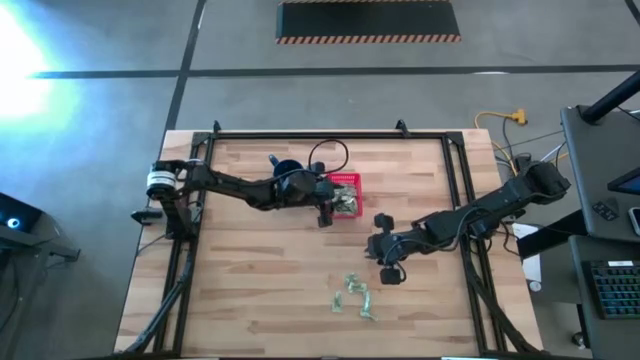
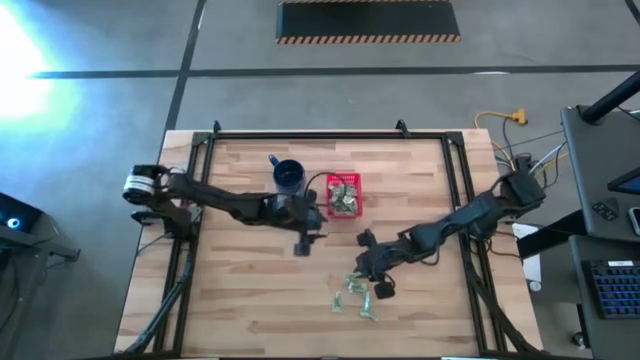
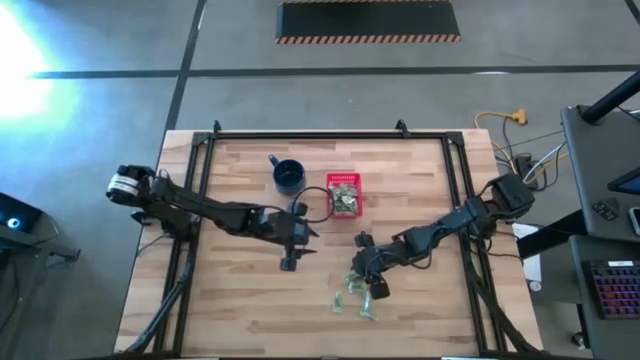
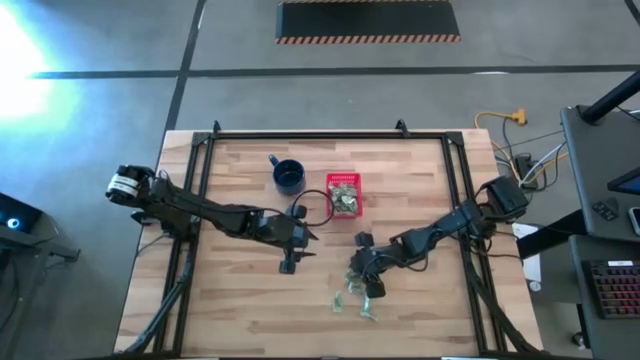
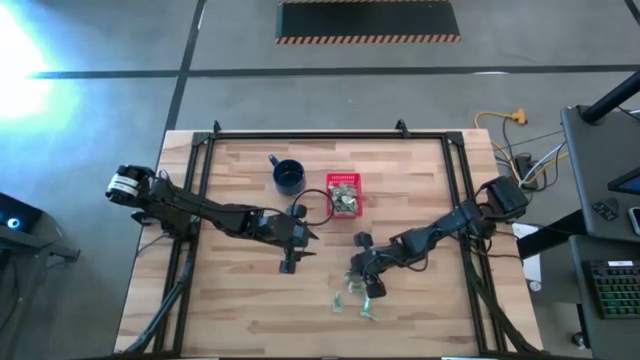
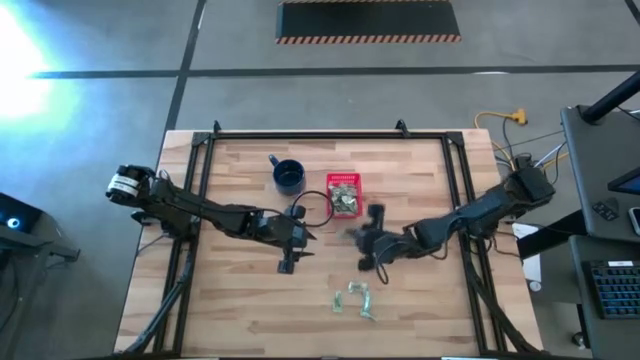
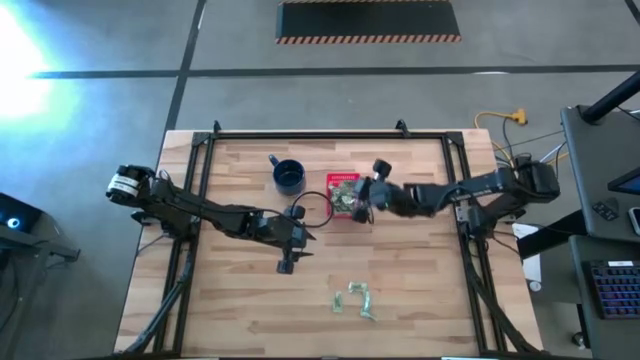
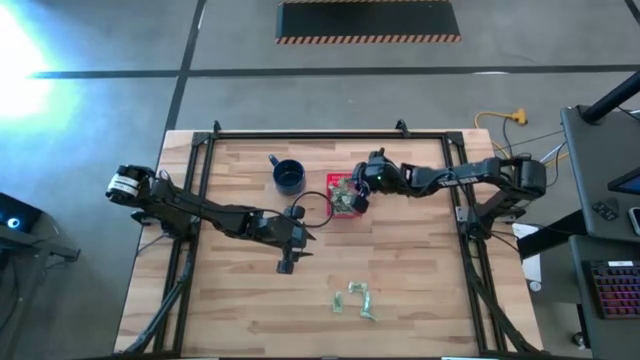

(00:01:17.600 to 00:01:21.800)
Task: Pick and place items into bin
Put the green stevia packet into the red bin

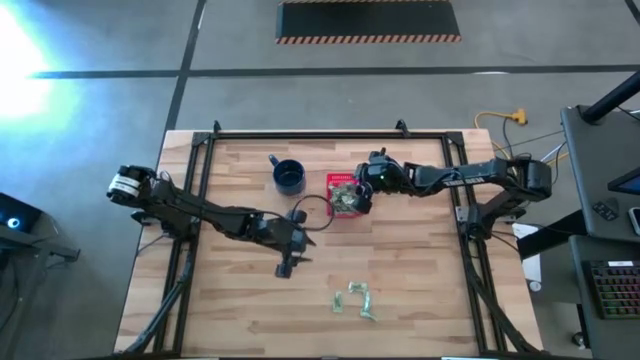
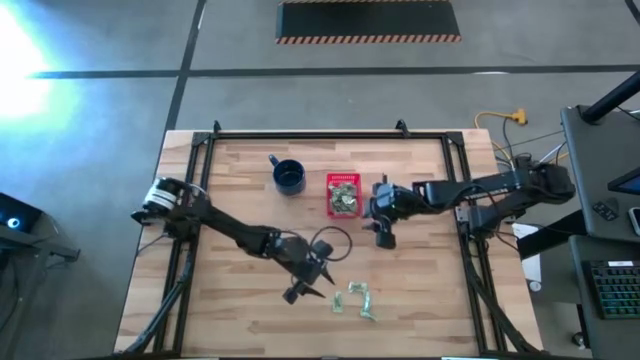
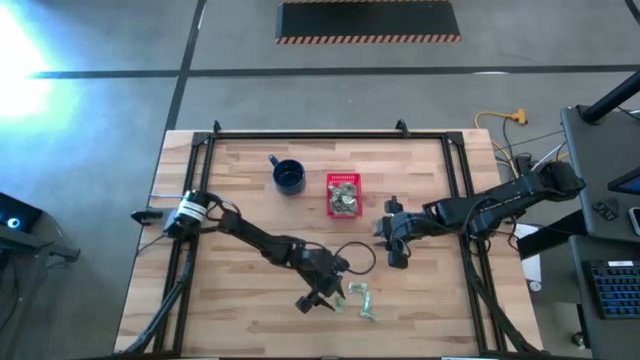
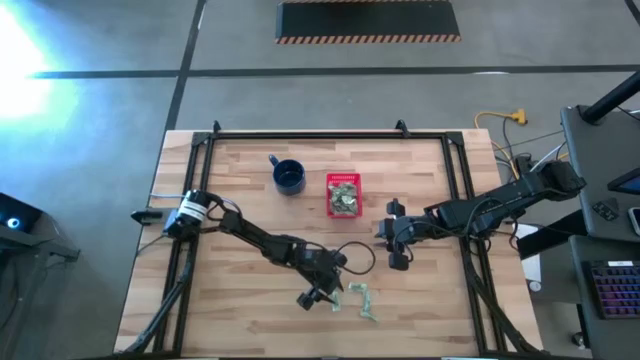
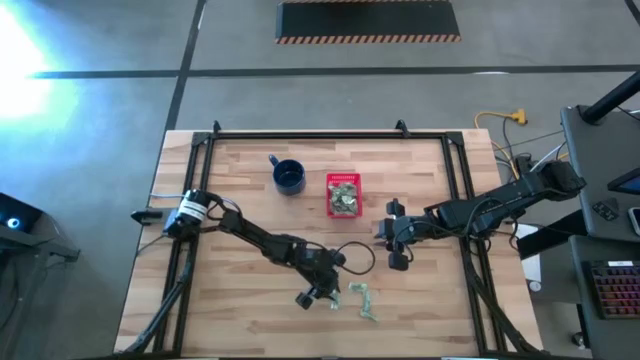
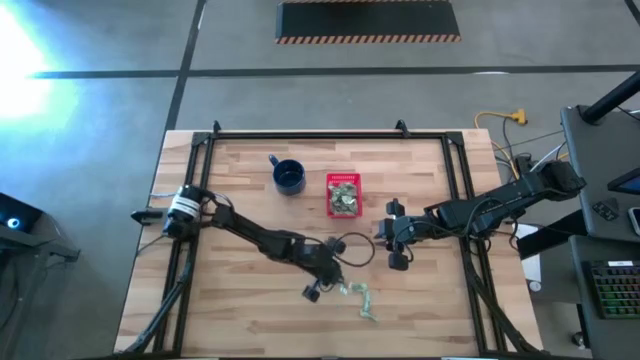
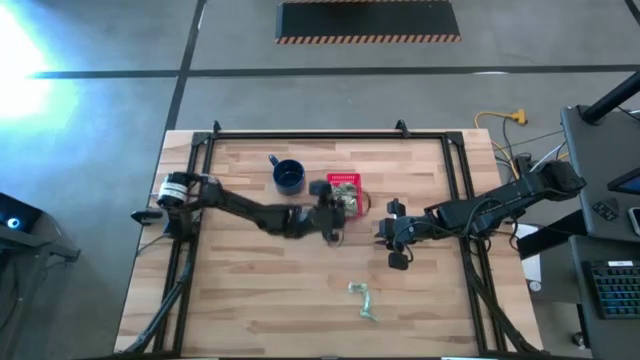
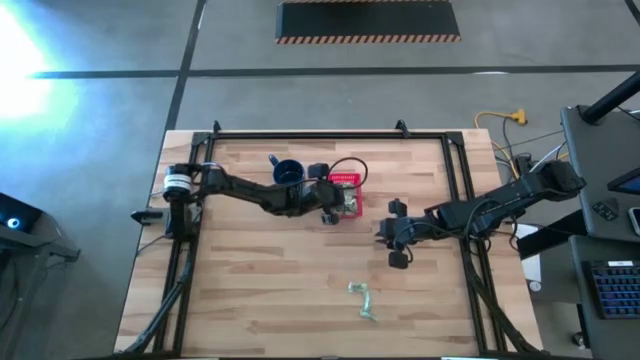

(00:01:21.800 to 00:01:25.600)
Put the green stevia packet into the red bin

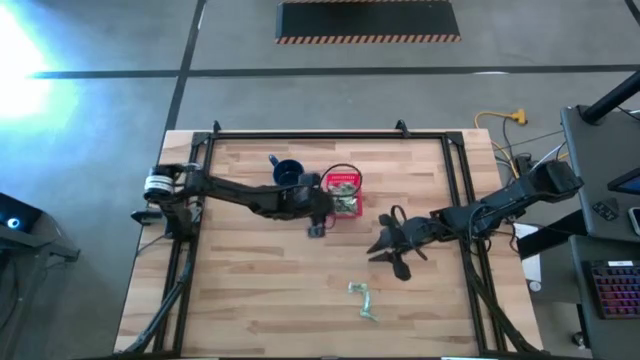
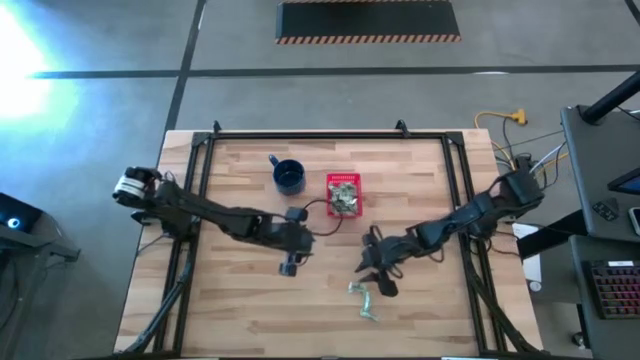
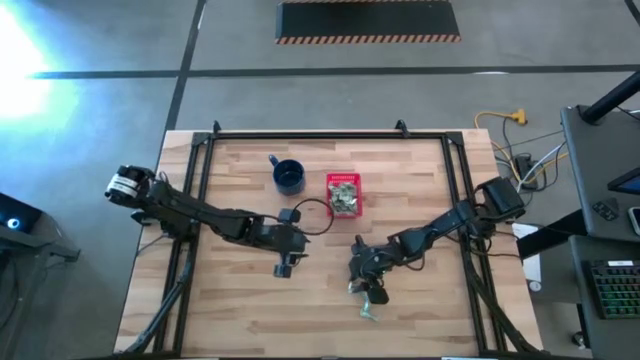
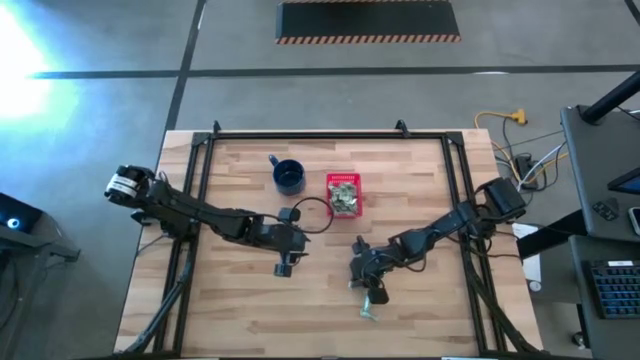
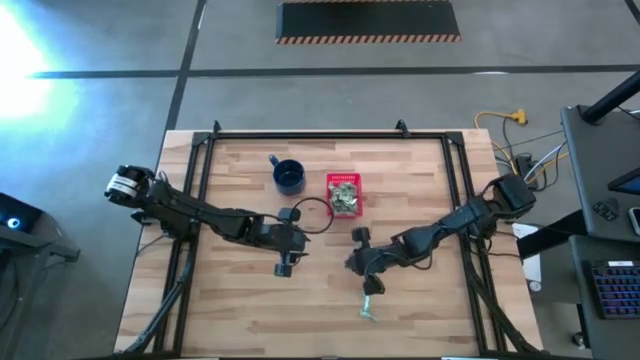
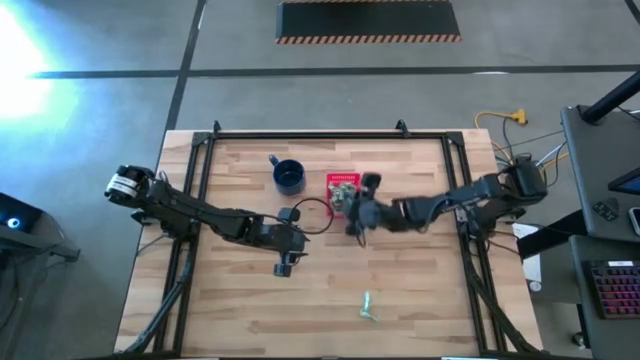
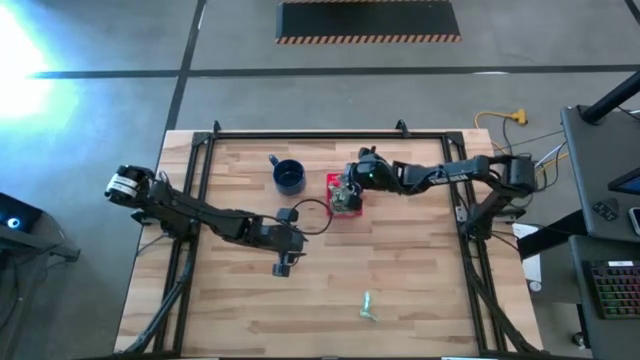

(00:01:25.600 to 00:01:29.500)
Put the green stevia packet into the red bin

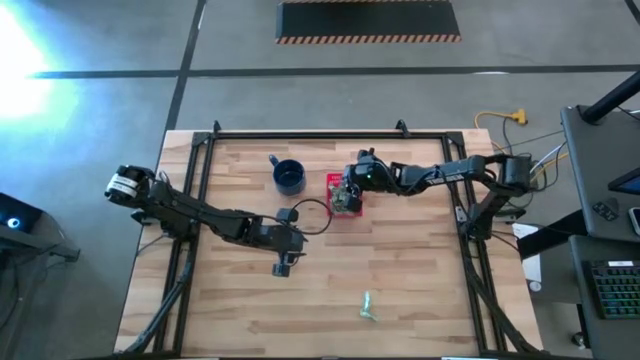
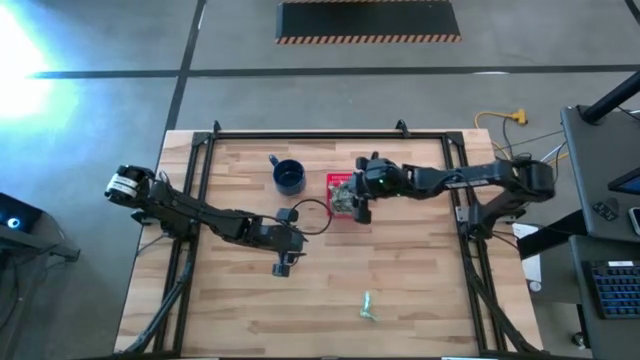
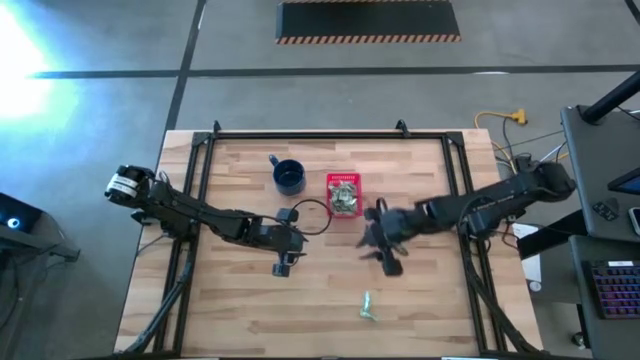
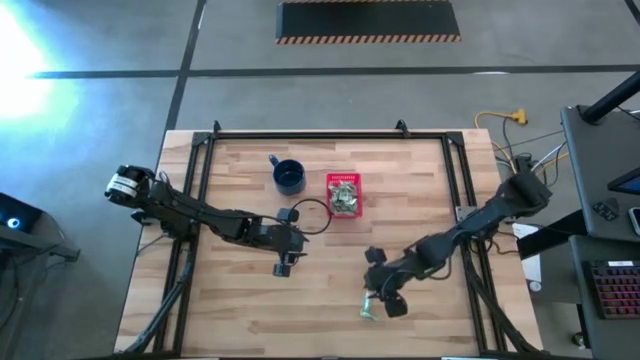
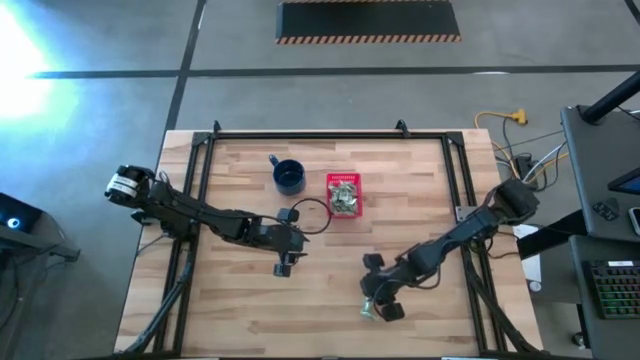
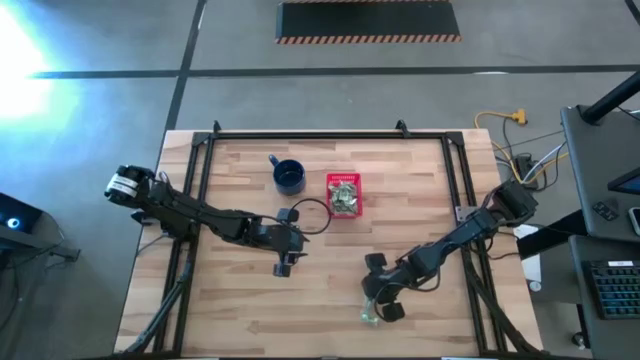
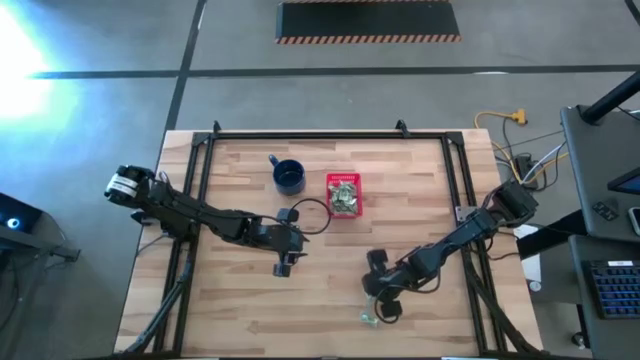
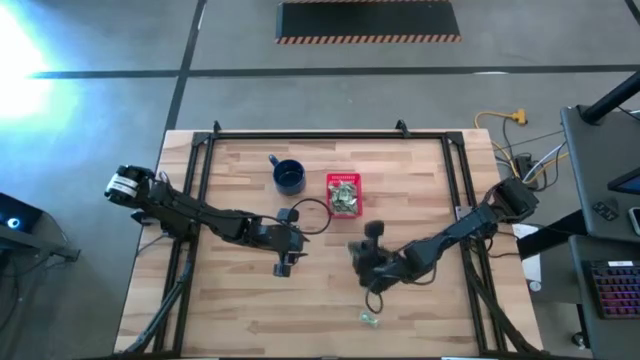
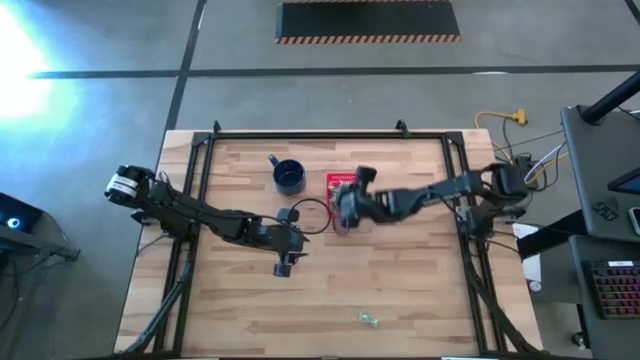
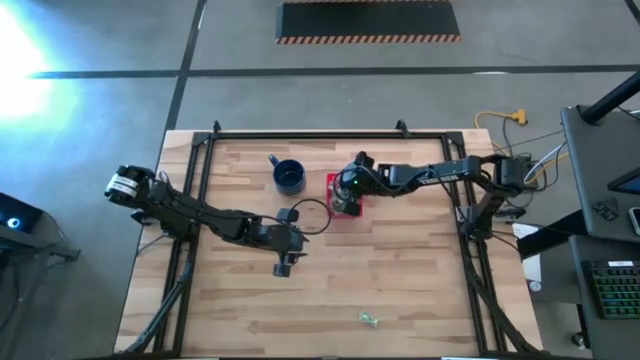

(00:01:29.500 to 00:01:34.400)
Put the green stevia packet into the red bin

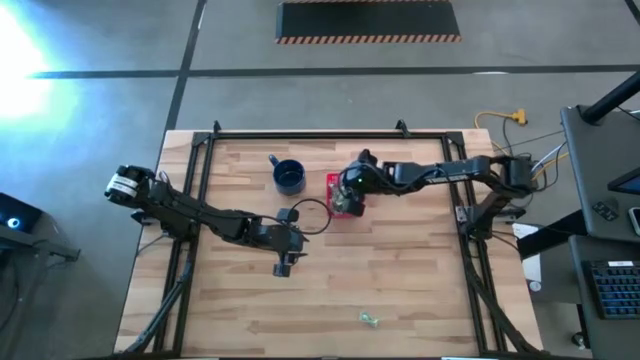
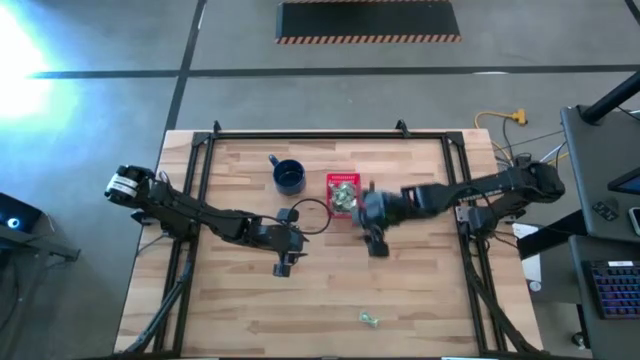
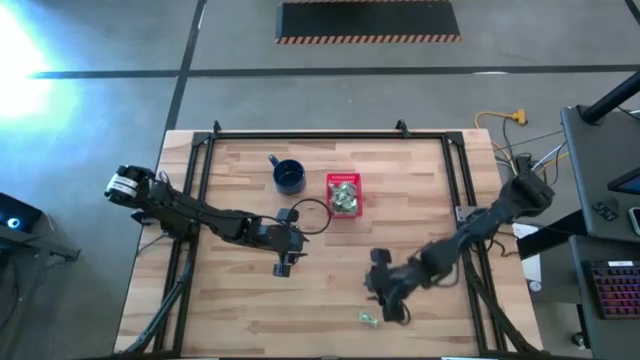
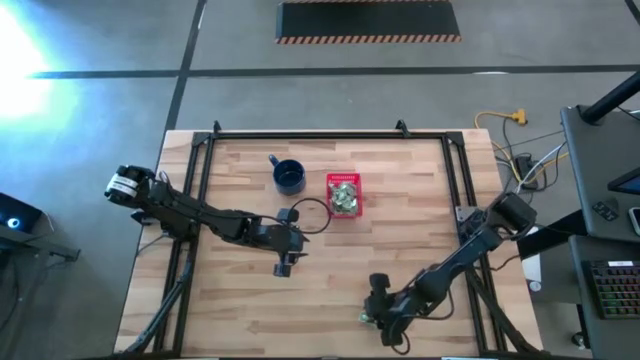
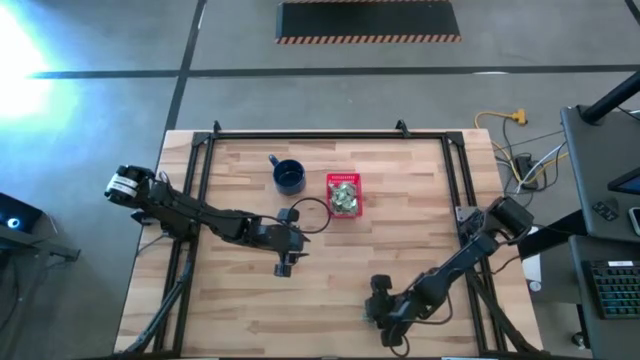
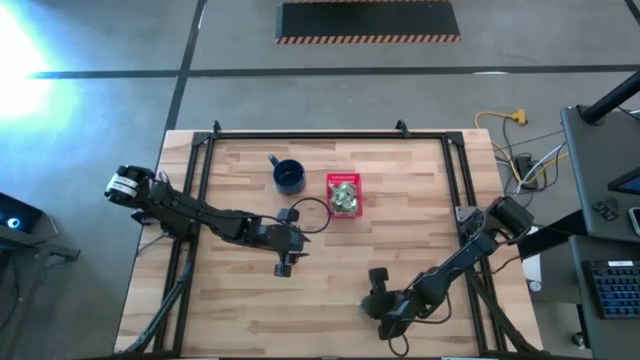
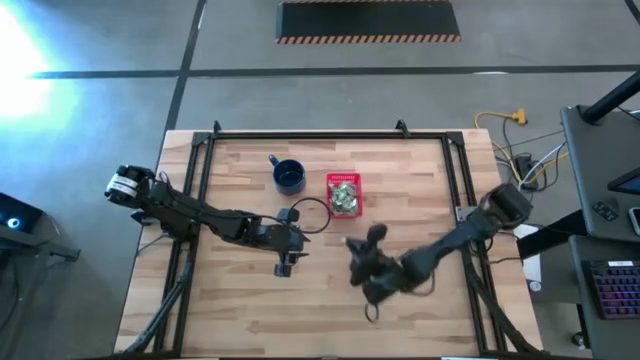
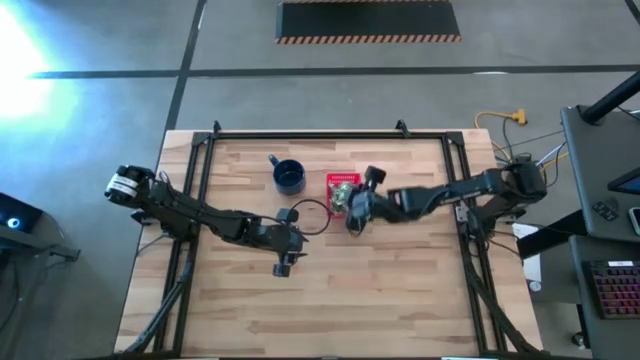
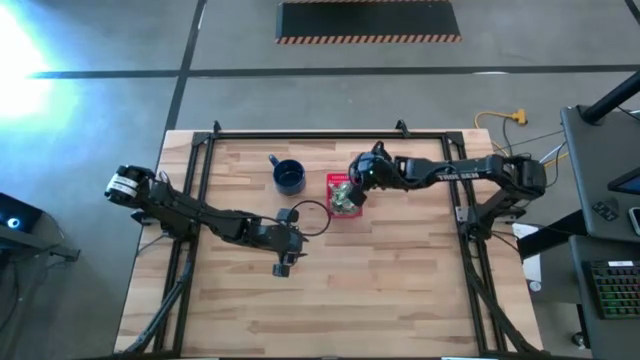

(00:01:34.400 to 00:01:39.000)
Put the green stevia packet into the red bin

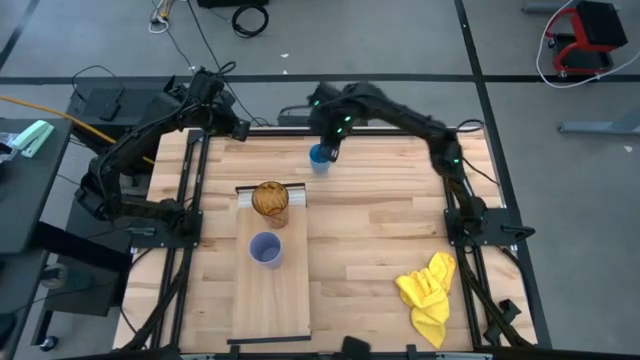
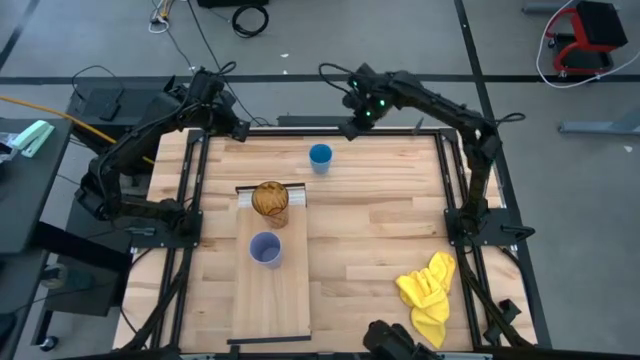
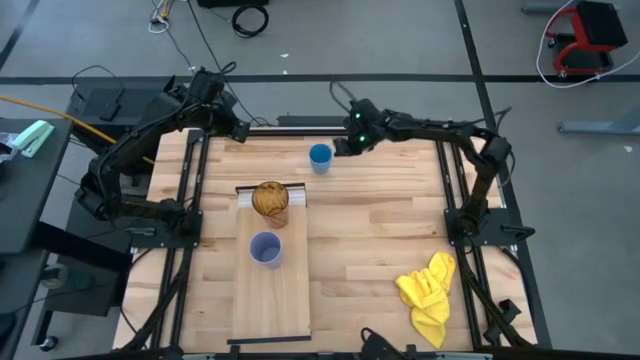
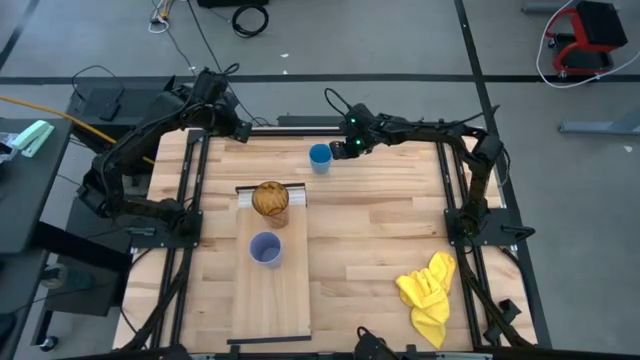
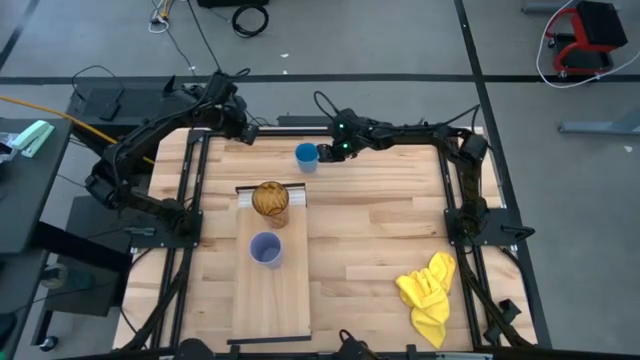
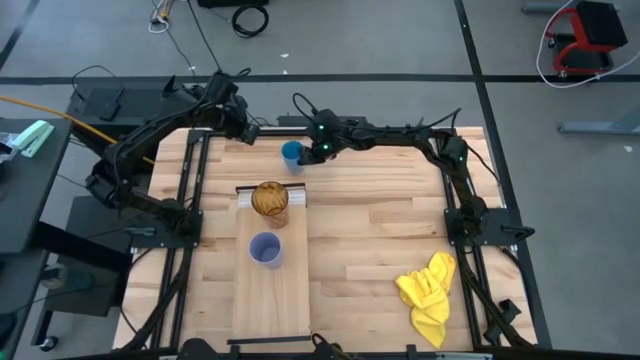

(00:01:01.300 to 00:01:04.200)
Task: Stack small to large cups/mugs on shelf
Adjust the light blue cup
